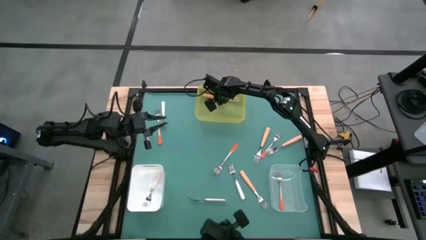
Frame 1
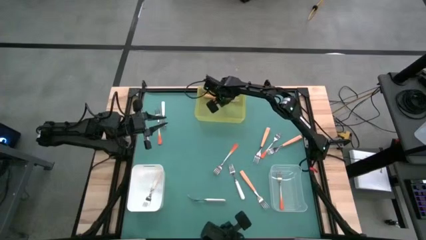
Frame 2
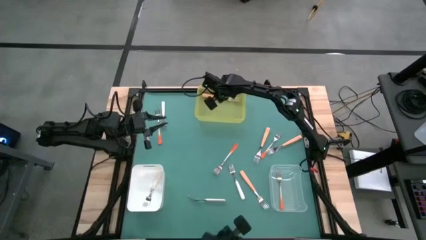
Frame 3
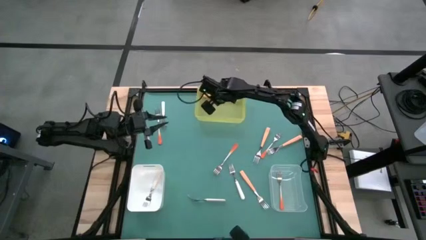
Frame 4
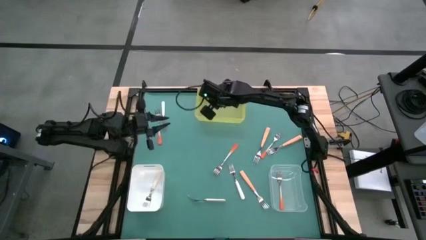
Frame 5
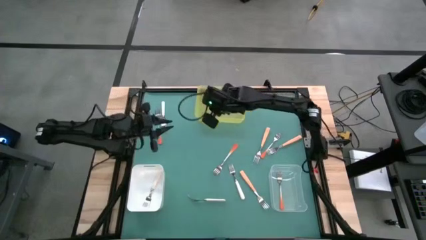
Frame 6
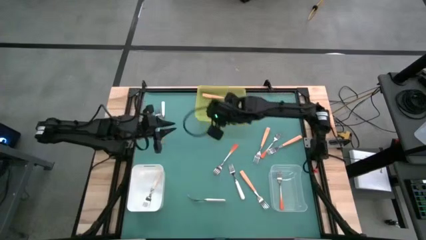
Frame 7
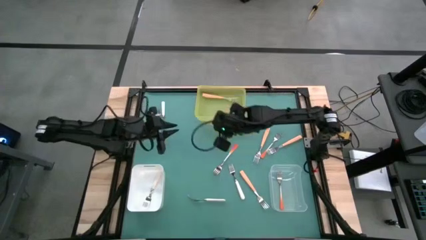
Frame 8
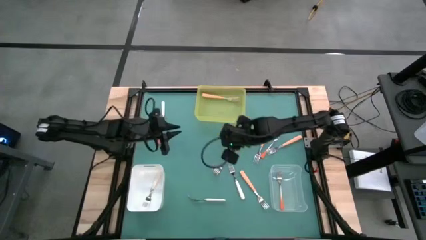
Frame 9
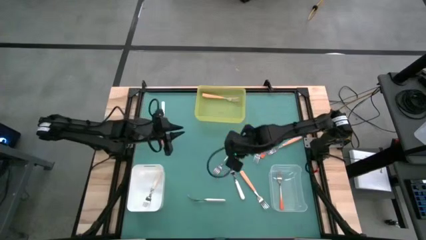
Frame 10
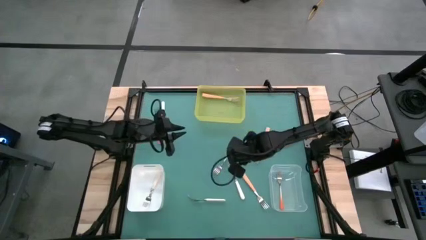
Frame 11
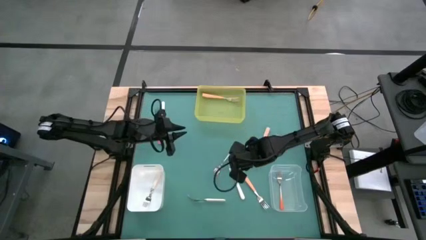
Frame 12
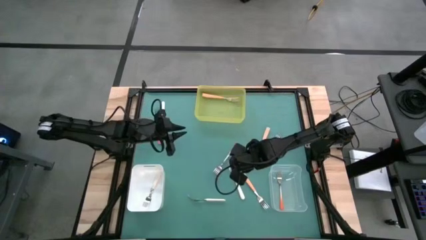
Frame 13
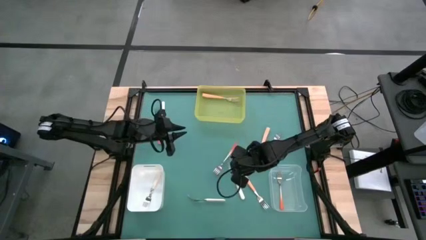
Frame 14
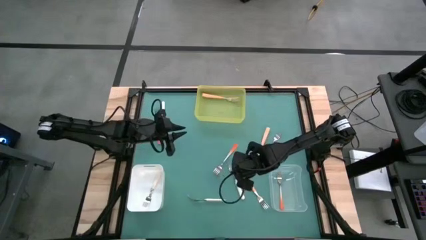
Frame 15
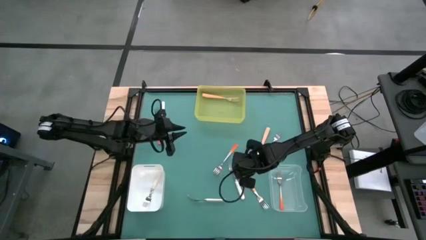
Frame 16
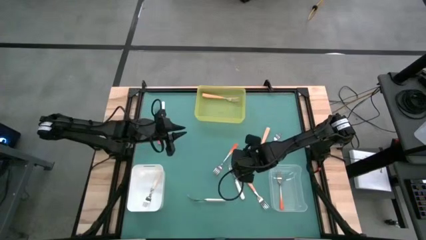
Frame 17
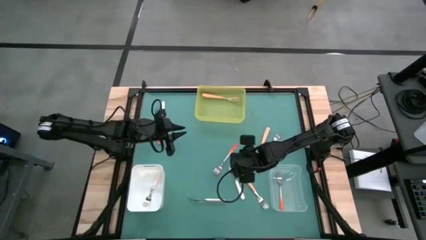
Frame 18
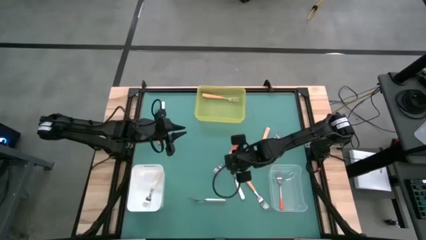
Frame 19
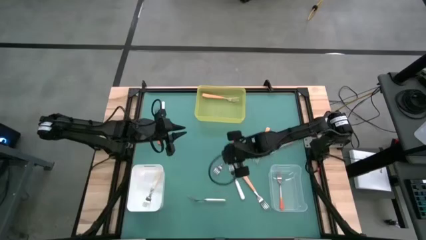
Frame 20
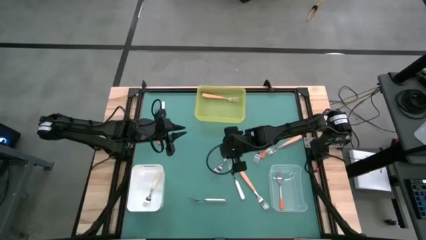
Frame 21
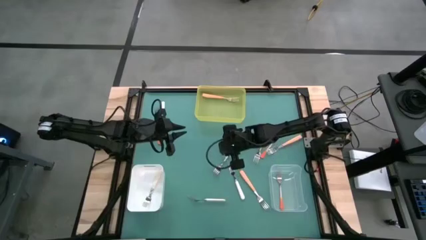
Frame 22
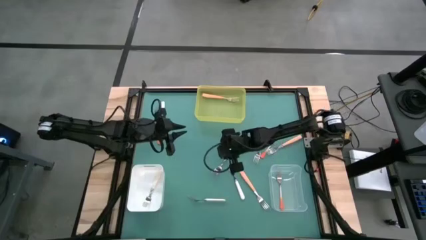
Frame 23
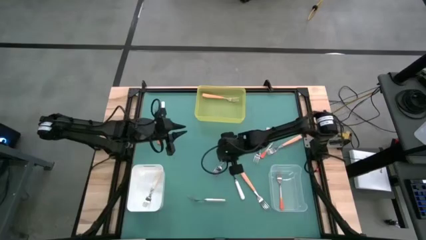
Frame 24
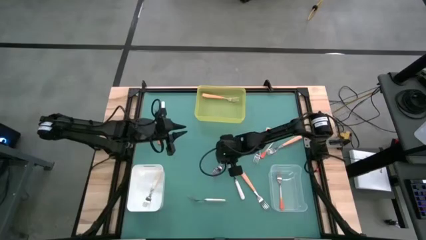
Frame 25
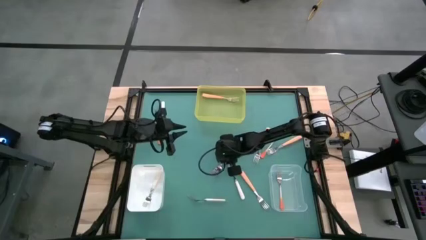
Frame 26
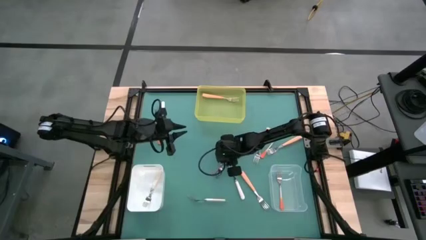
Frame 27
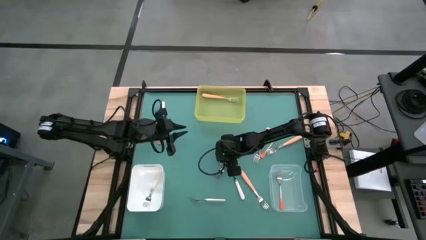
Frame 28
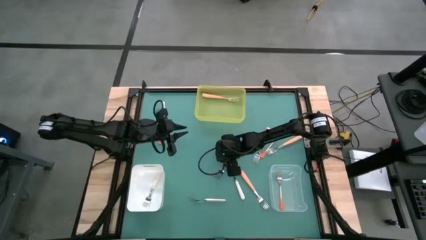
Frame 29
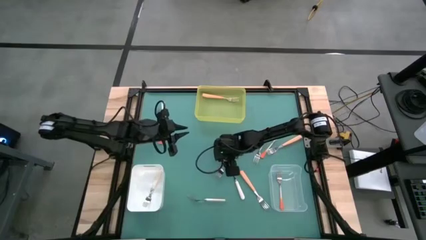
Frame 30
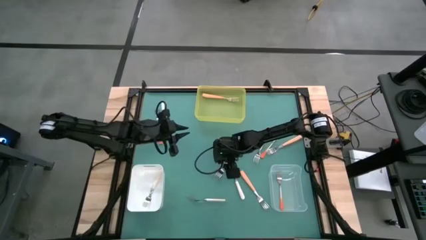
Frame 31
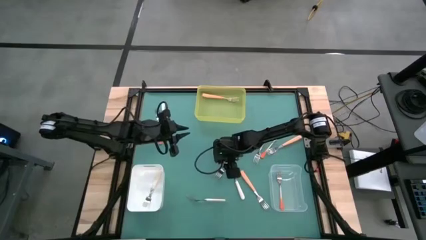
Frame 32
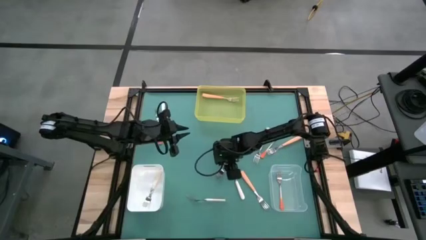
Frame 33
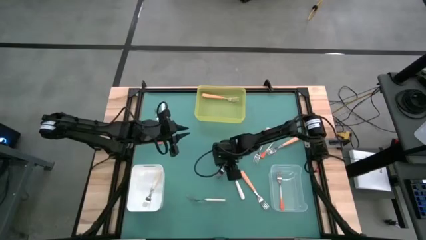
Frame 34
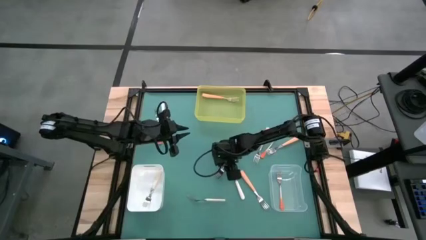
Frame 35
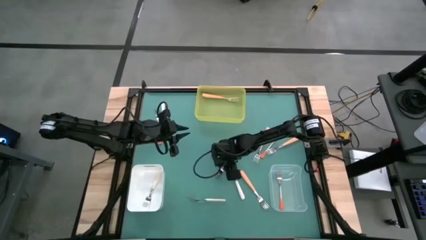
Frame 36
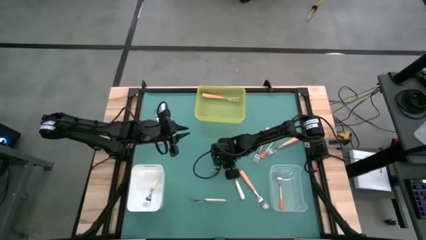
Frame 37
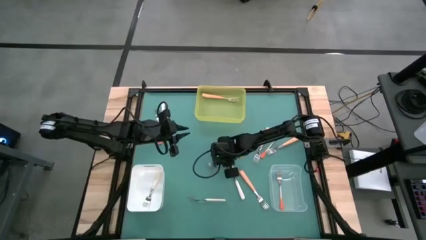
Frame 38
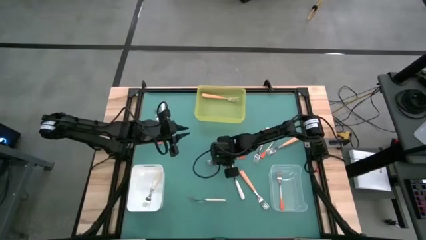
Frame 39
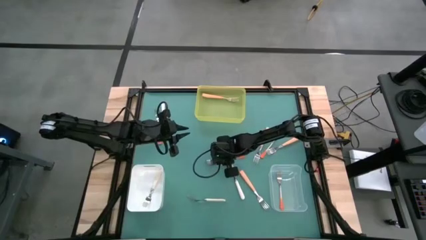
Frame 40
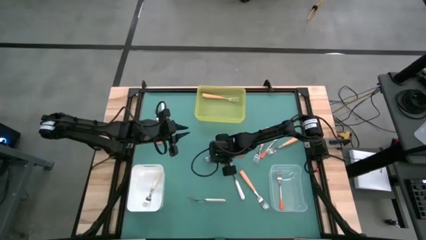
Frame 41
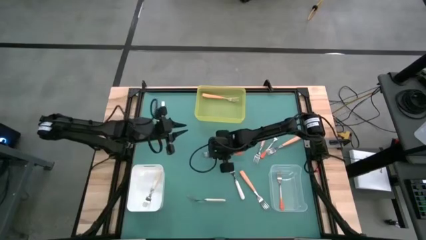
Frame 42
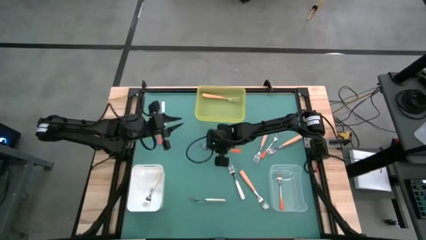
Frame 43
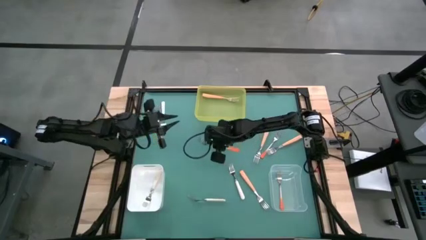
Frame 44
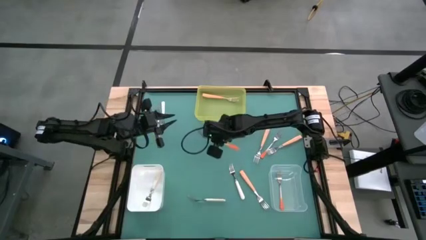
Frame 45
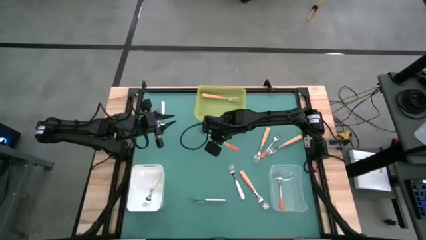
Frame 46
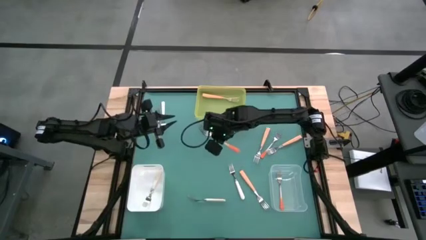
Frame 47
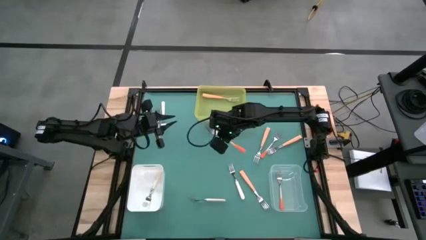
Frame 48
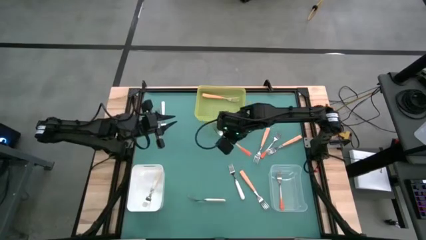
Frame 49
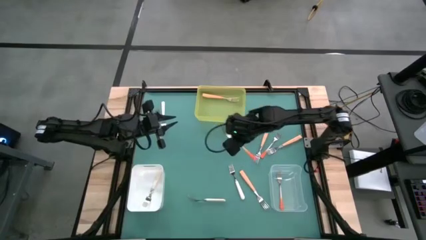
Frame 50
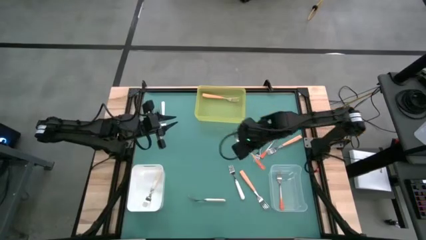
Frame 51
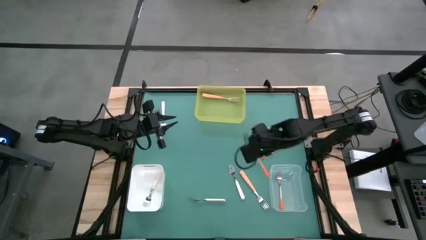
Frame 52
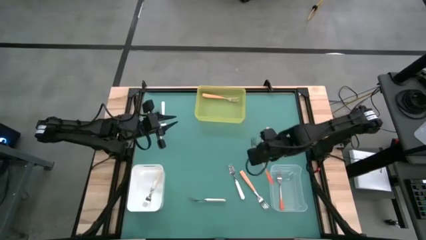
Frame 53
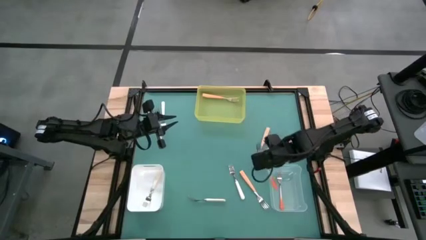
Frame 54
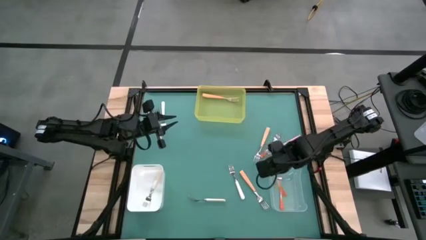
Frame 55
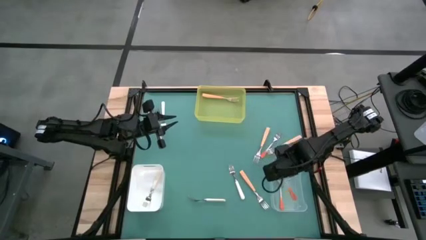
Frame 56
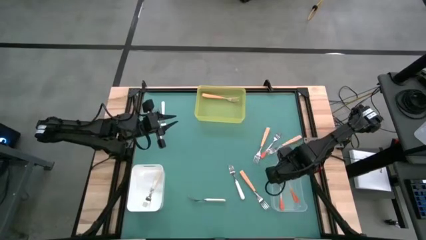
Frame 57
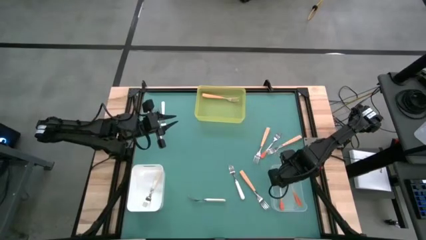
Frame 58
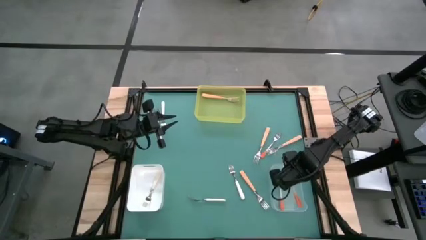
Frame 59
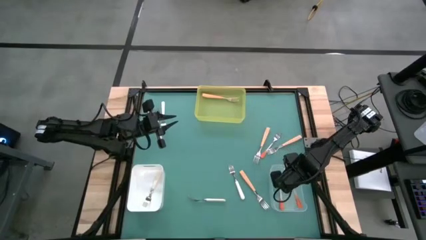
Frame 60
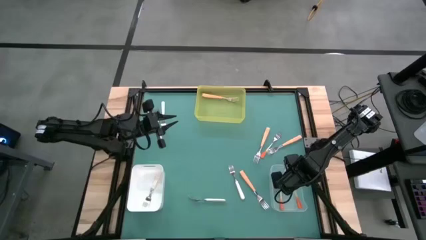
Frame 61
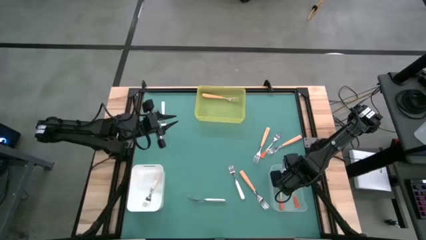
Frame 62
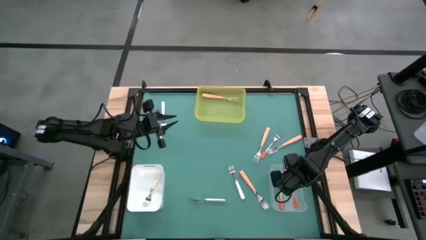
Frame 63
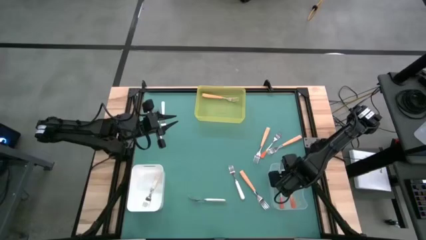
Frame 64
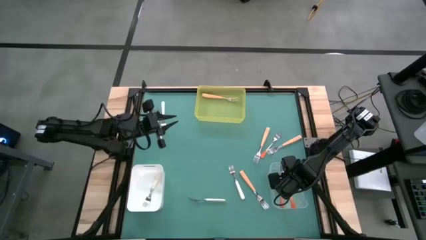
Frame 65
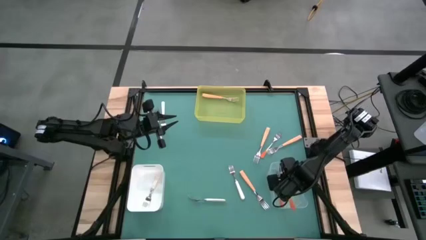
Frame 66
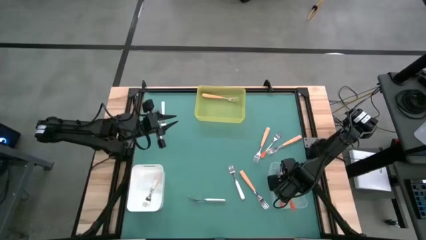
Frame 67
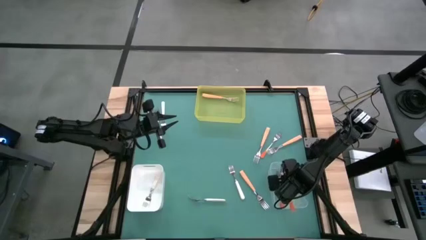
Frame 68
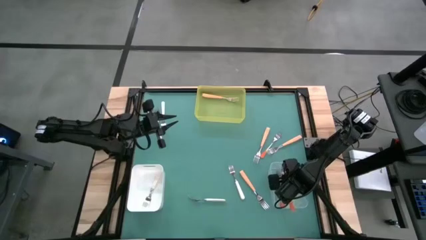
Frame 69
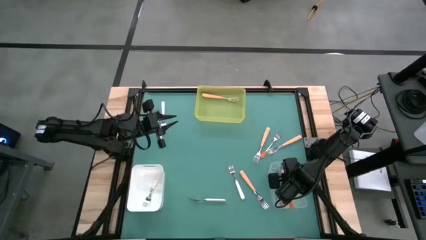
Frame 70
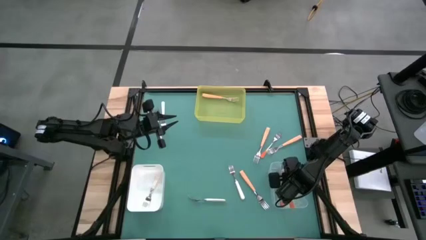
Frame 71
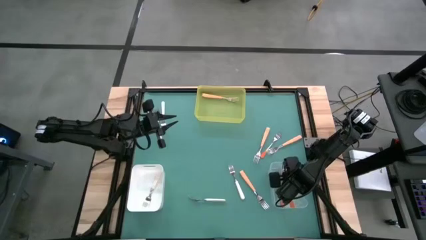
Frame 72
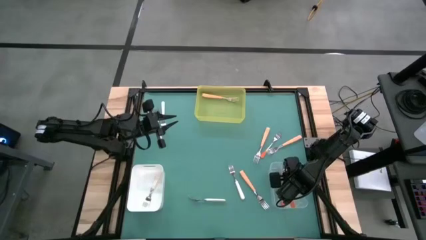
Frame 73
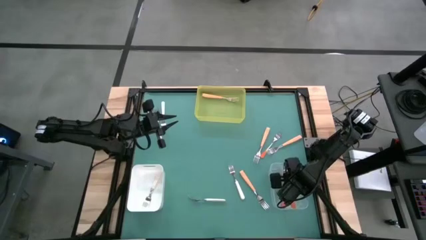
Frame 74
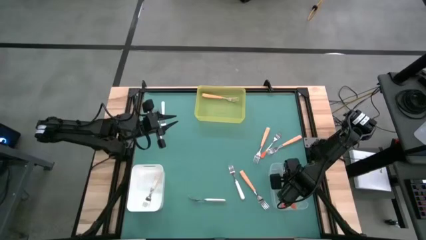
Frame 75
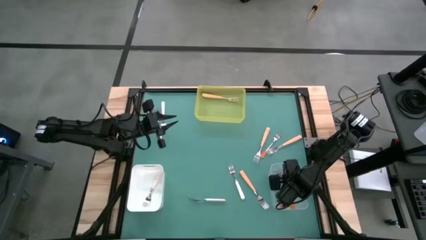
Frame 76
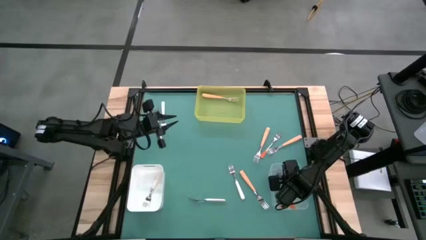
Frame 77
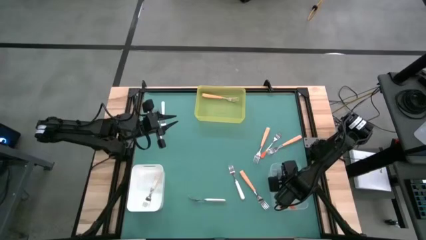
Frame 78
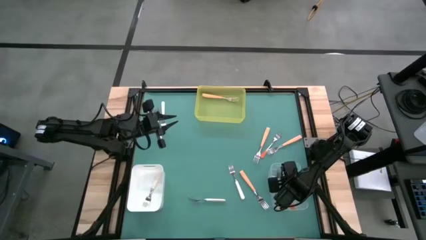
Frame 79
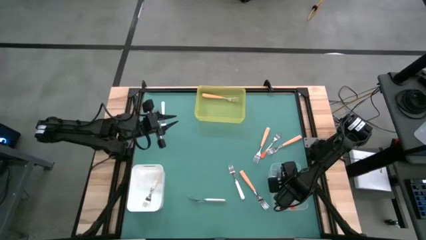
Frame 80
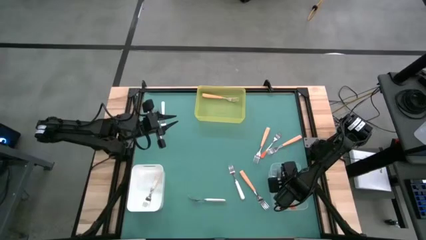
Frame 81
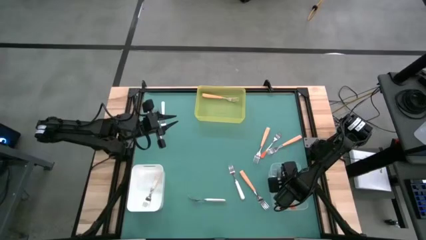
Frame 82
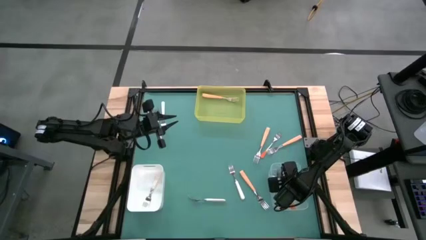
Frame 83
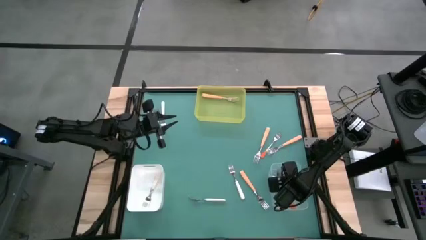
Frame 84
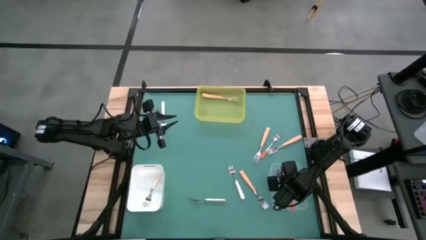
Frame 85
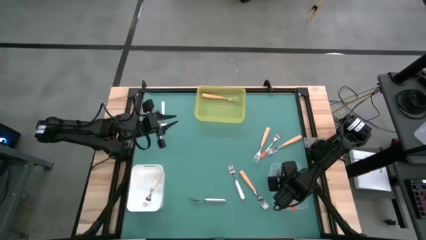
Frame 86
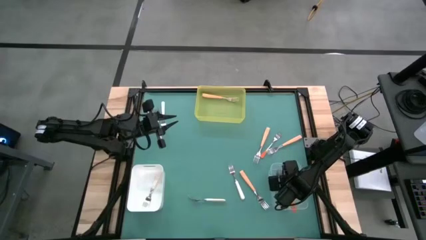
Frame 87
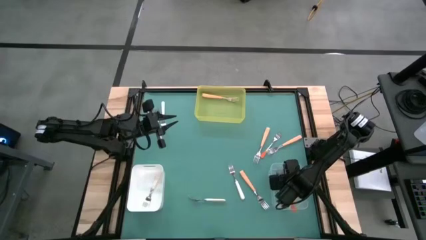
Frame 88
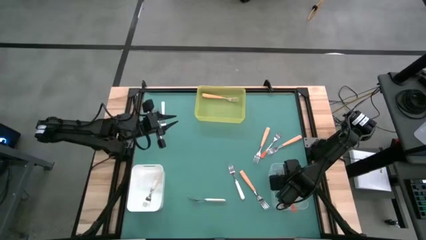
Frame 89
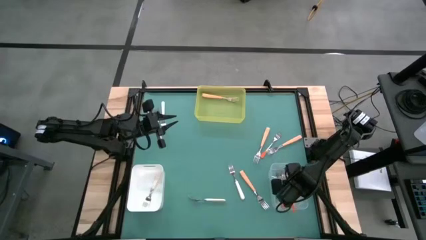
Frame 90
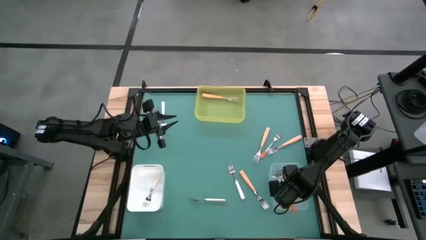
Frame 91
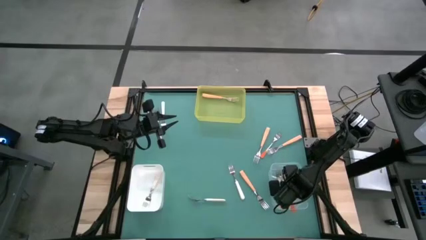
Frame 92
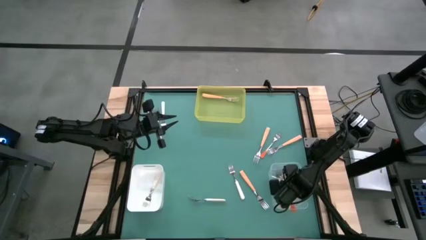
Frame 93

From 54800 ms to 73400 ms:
Task: Sort silverware by color (type)
Put the orange fork into the transparent bin
